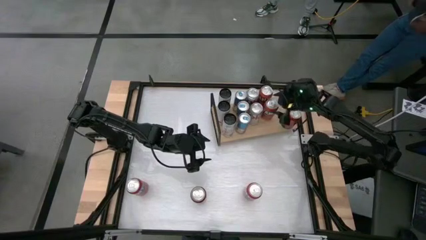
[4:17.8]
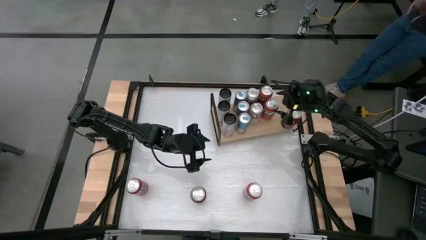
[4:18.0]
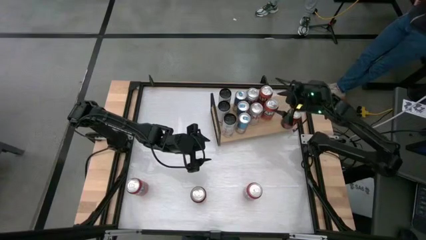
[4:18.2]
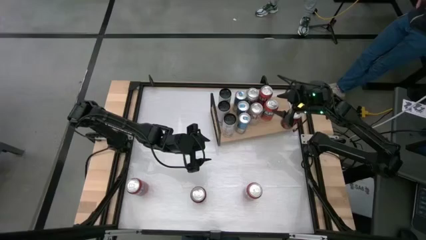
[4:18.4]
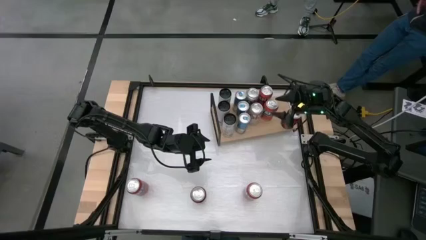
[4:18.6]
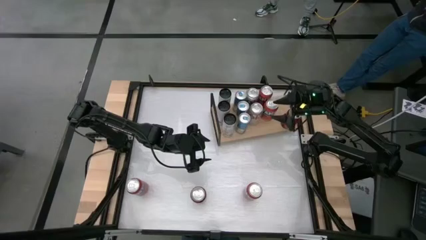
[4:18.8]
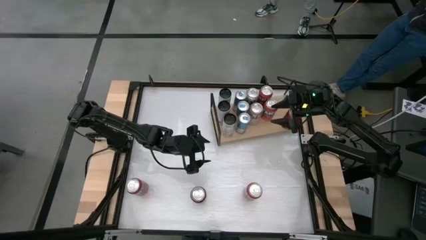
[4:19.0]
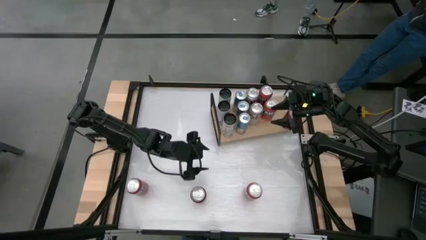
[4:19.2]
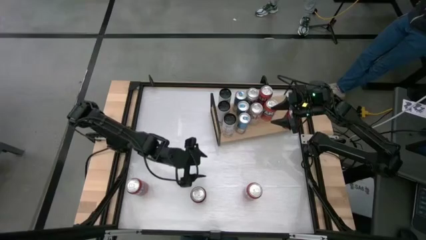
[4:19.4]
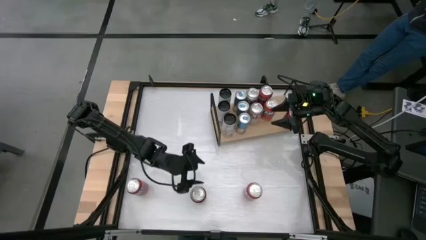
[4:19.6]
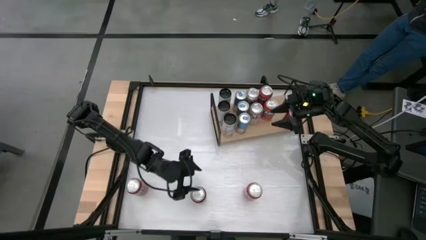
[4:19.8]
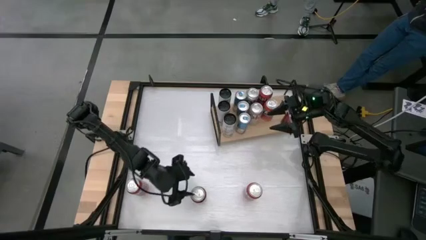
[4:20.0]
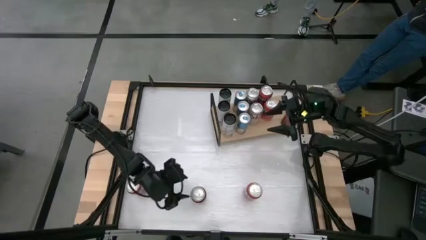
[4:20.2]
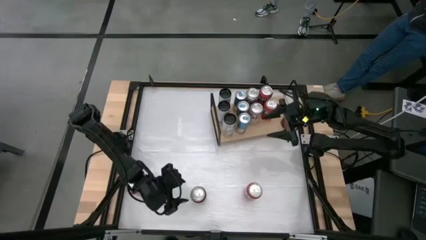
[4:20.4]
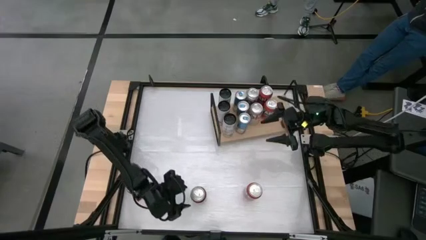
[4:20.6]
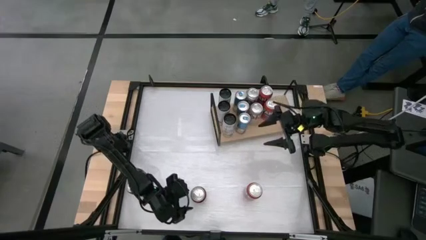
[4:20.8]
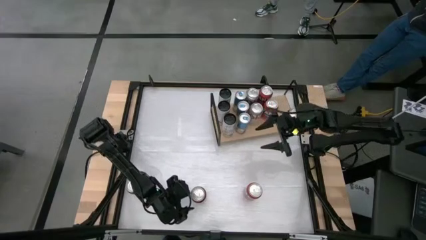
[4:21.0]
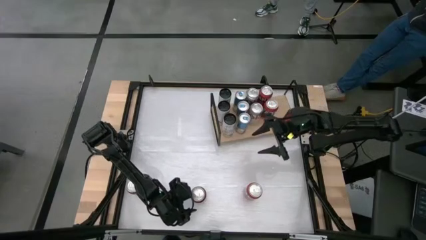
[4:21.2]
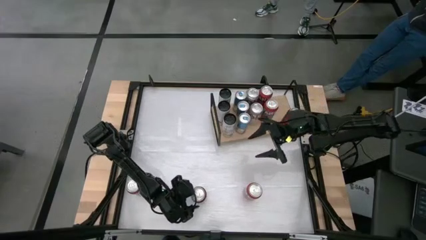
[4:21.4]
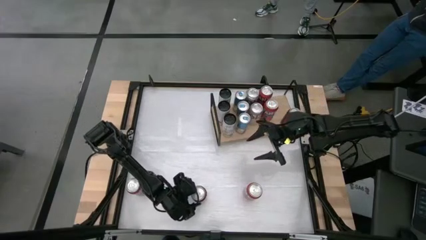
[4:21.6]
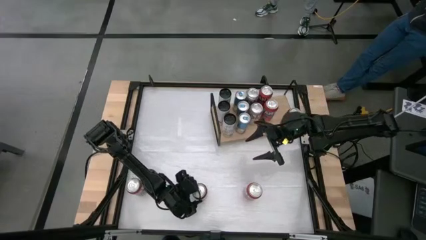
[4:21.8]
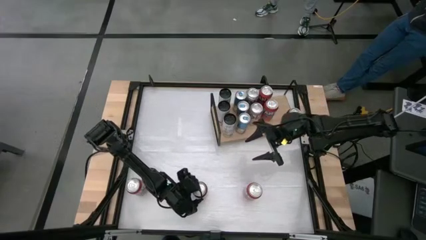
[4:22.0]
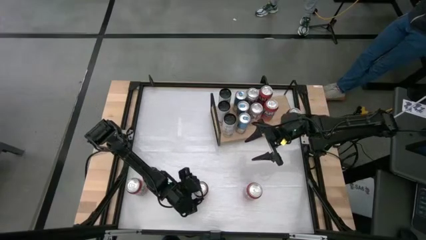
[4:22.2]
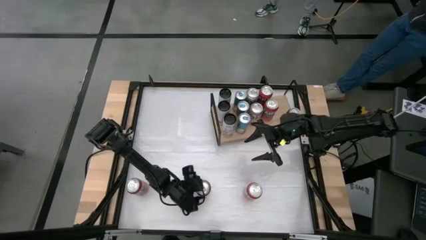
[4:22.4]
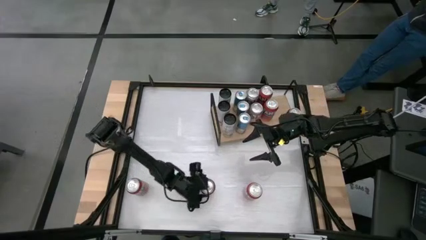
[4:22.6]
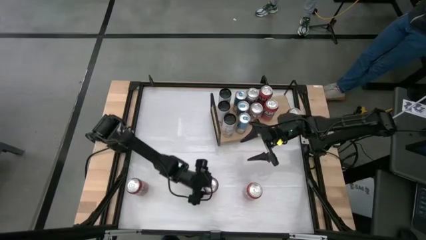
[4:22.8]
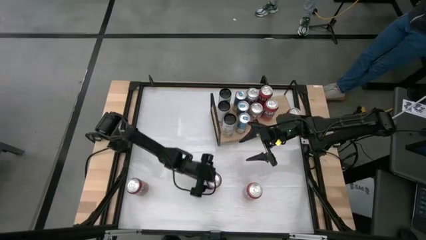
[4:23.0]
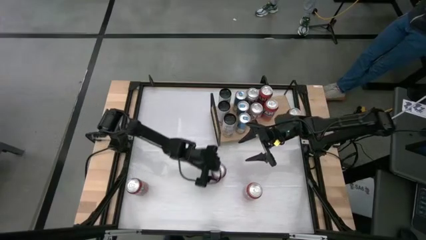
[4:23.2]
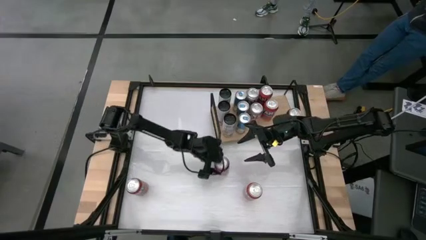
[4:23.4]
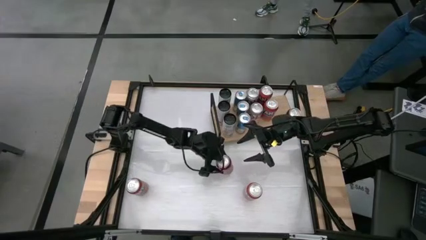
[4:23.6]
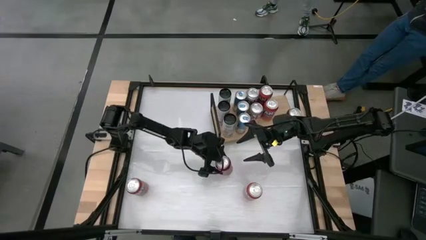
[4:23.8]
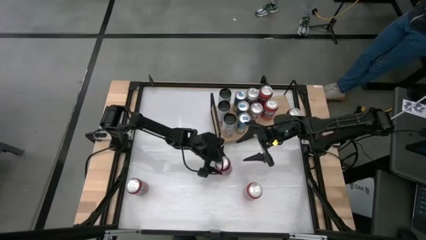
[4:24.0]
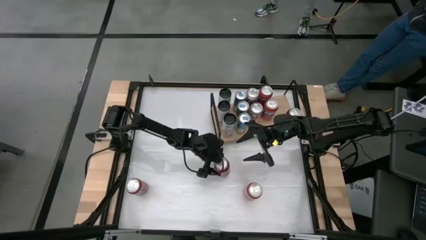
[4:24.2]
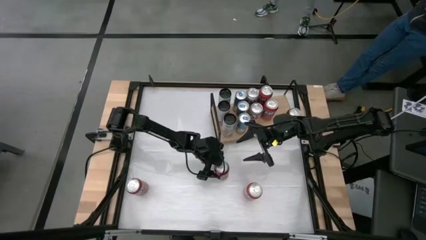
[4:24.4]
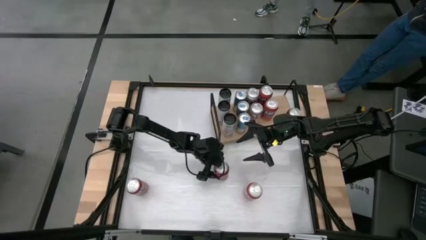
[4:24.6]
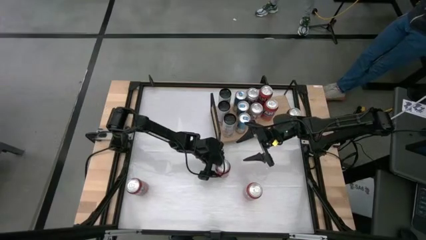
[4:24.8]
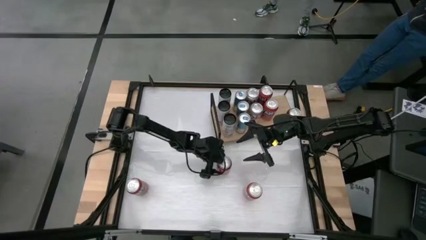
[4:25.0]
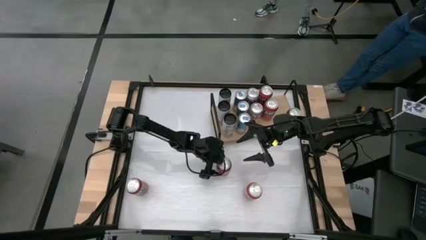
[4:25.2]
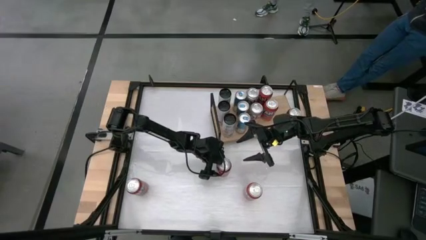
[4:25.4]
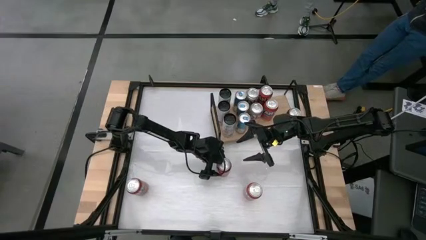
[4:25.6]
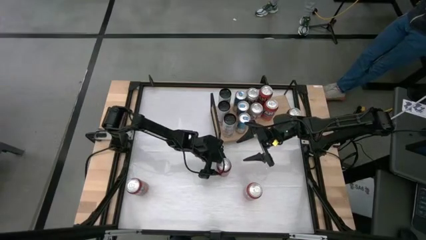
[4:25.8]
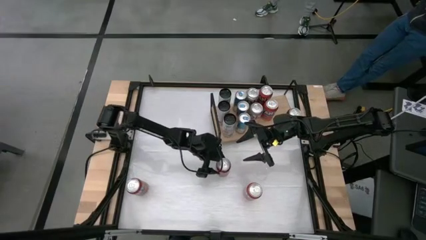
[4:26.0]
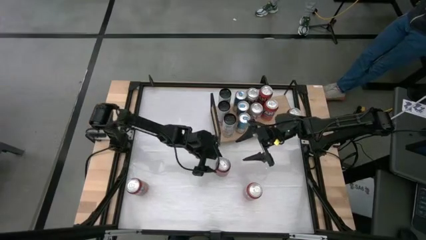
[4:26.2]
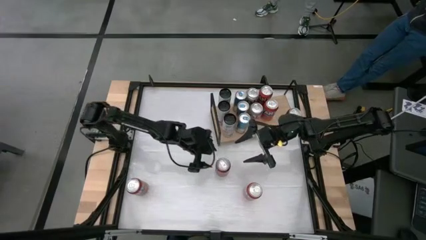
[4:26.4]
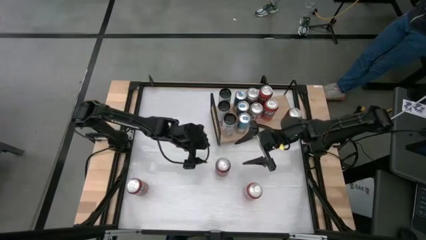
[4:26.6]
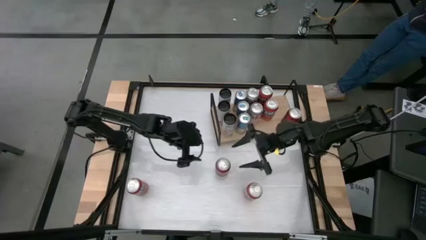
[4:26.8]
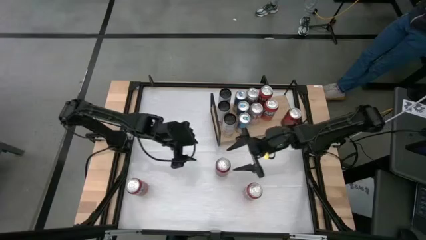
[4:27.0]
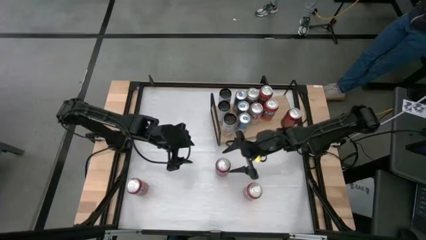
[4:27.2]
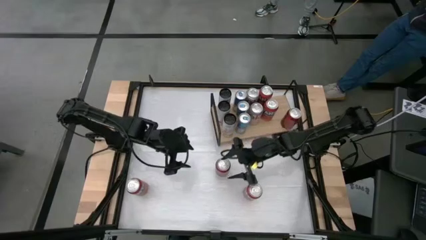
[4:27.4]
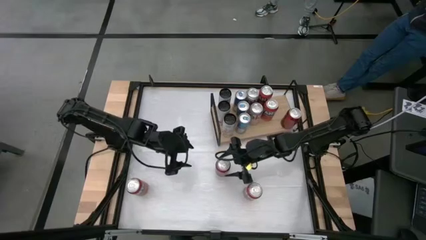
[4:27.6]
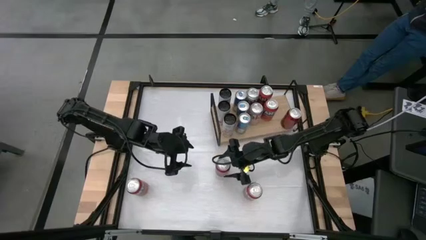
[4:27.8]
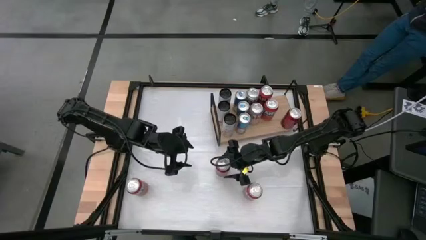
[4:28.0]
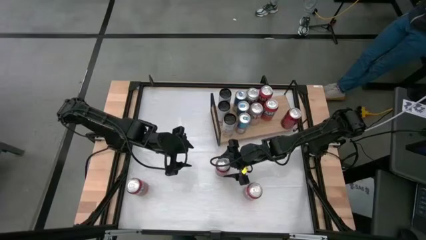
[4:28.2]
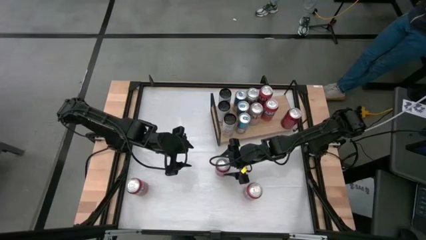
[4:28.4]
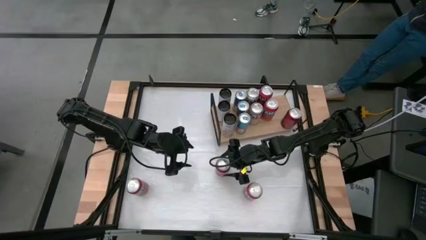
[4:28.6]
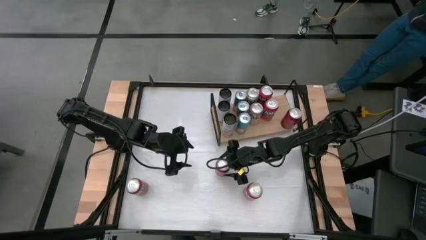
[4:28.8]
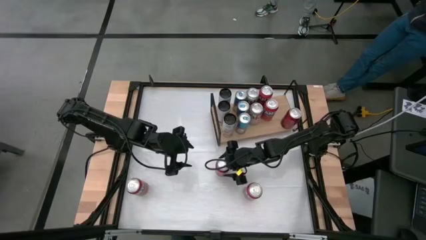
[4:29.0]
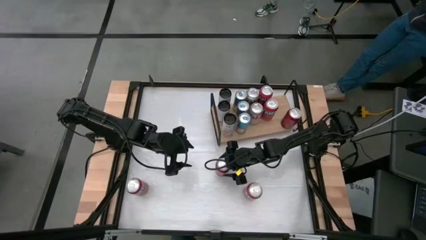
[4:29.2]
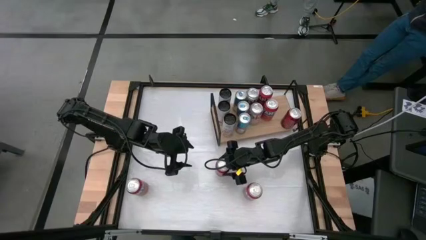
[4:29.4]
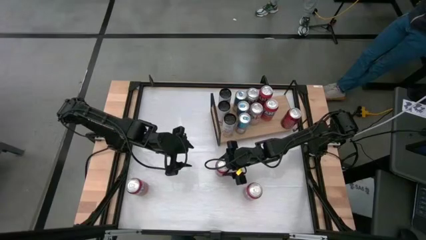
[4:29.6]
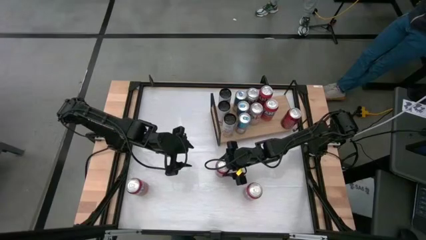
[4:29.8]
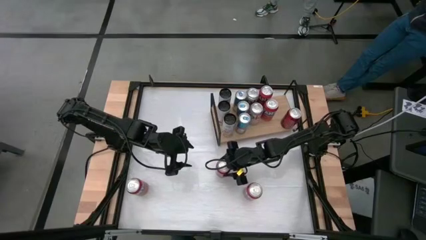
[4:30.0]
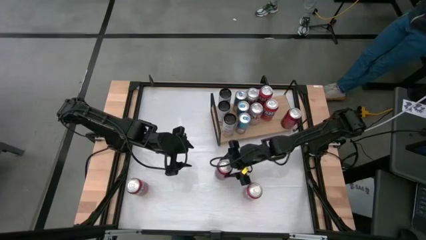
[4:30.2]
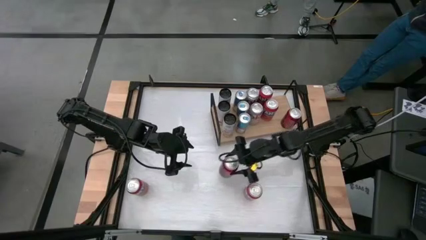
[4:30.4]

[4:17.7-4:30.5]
Task: Place canned beverage on shelf
Put the red soda can on the shelf aligned with the other red soda can

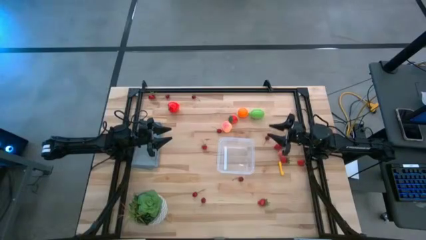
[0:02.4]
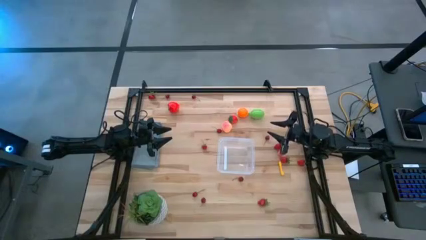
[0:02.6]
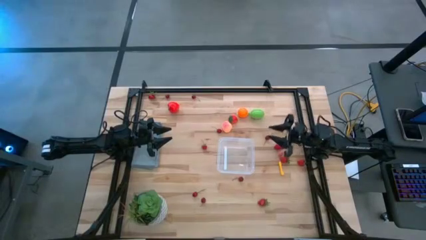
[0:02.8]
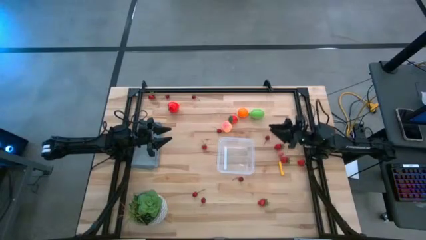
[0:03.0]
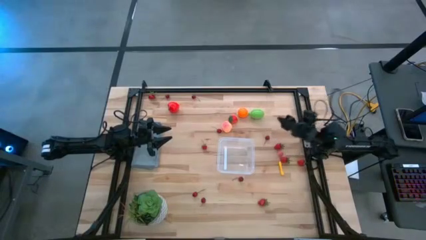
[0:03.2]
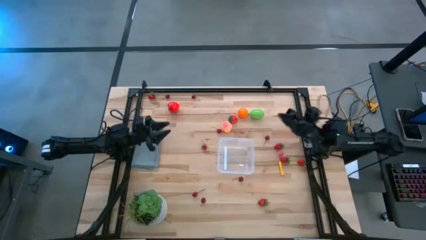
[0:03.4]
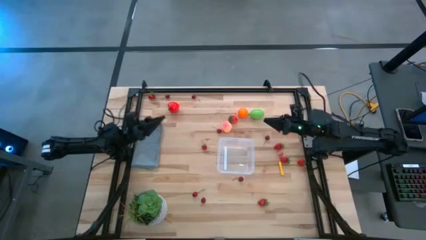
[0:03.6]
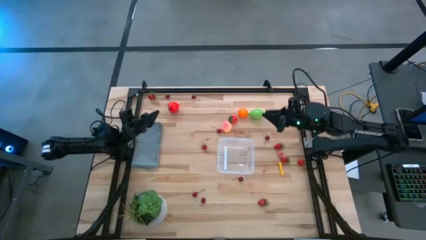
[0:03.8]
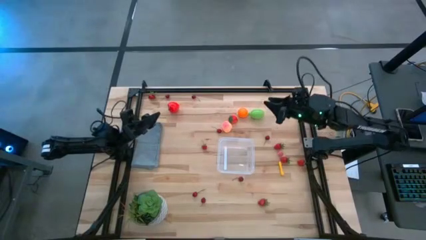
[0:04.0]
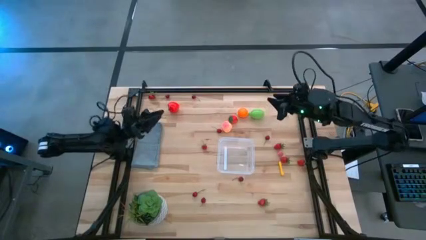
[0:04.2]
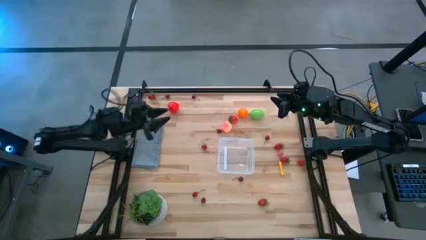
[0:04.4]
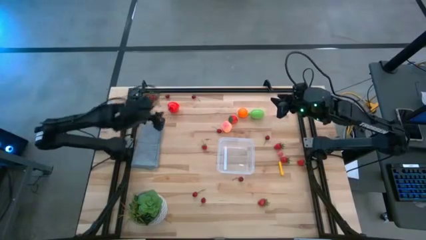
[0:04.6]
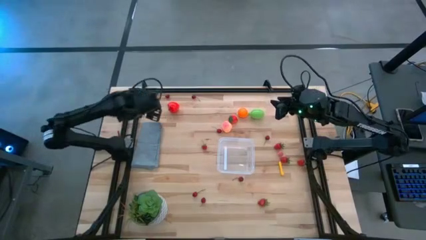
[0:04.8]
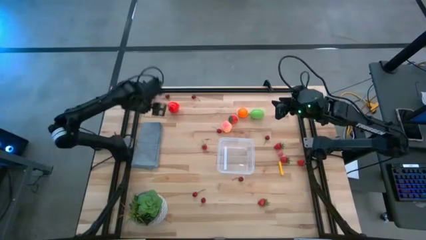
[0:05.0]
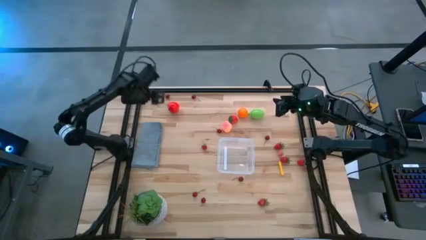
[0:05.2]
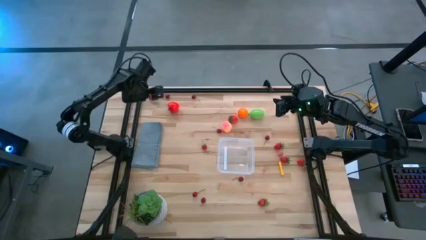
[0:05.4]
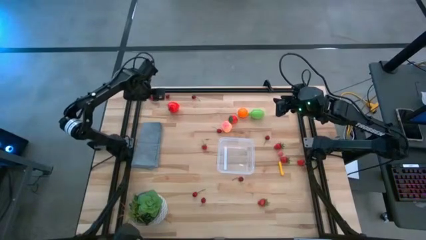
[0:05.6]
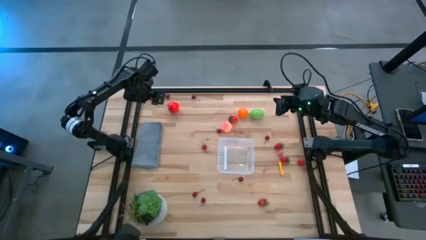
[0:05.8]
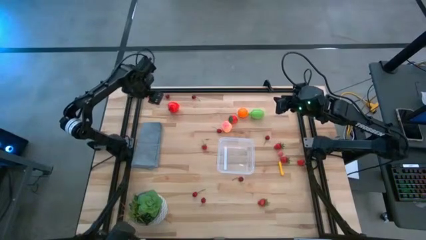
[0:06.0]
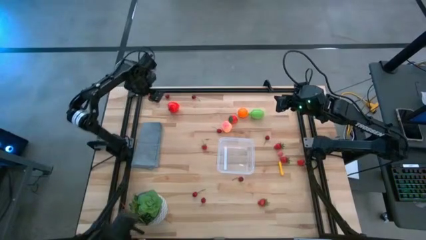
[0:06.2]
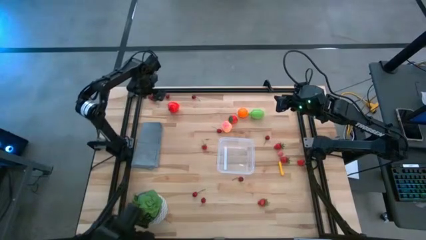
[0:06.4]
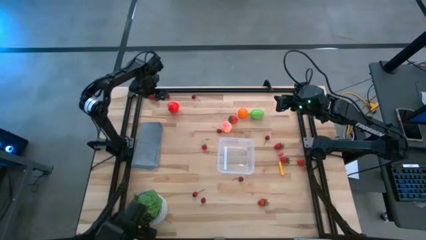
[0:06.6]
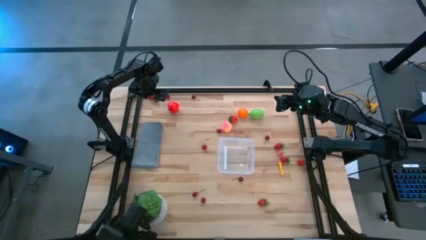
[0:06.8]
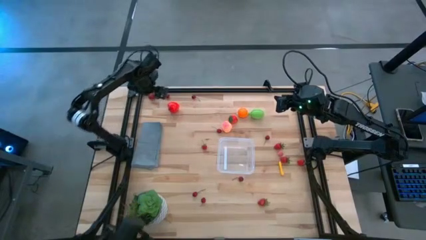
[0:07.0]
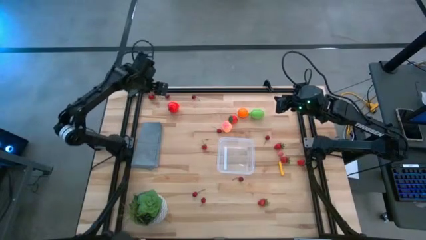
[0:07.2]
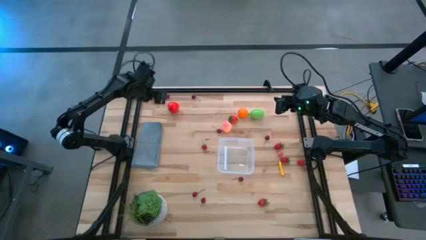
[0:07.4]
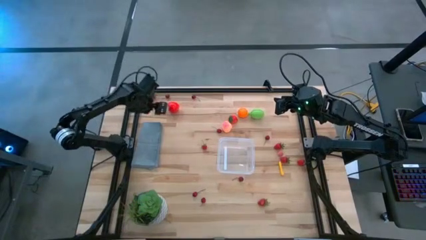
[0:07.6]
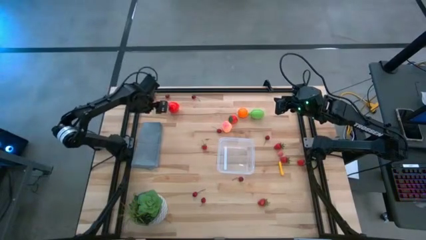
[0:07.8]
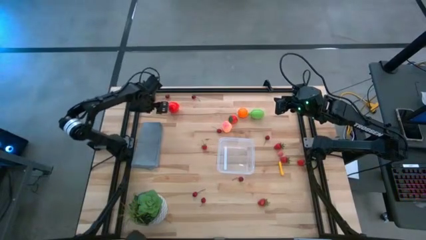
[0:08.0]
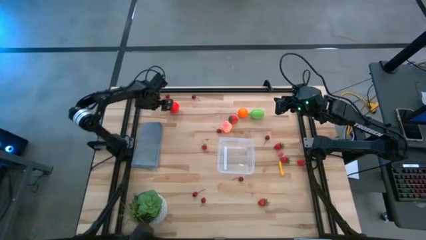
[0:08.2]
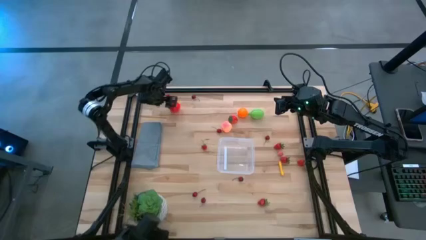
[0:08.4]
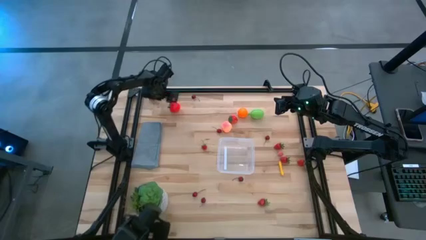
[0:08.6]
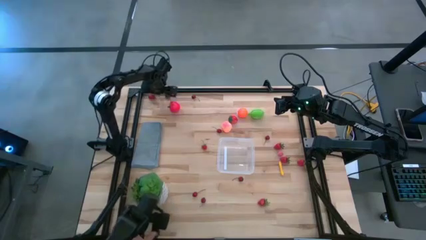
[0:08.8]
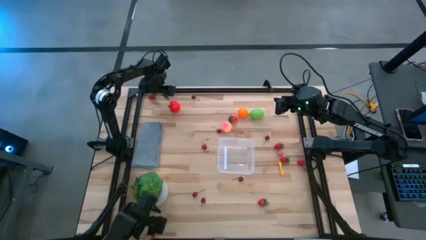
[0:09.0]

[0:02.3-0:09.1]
Task: Pick and placing Produce into tupperware
Put the strawberry into the transparent bin
